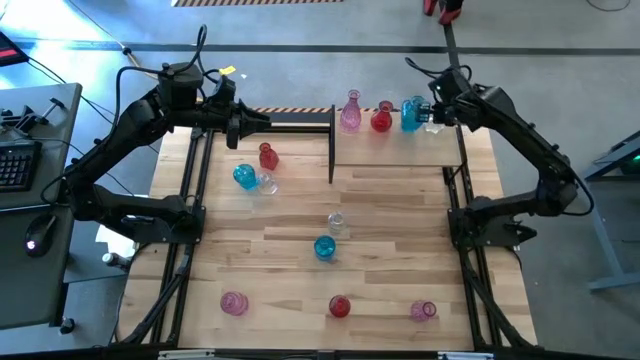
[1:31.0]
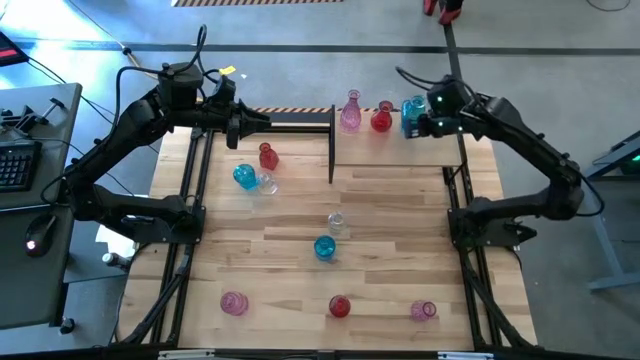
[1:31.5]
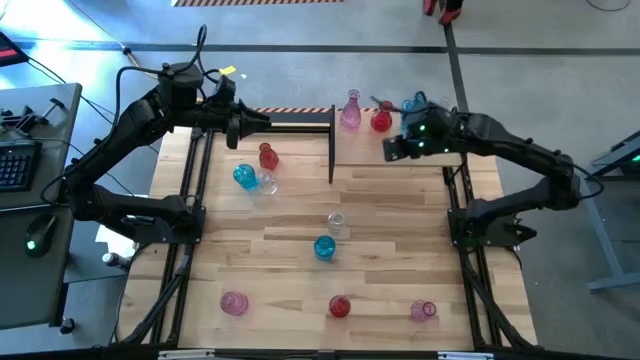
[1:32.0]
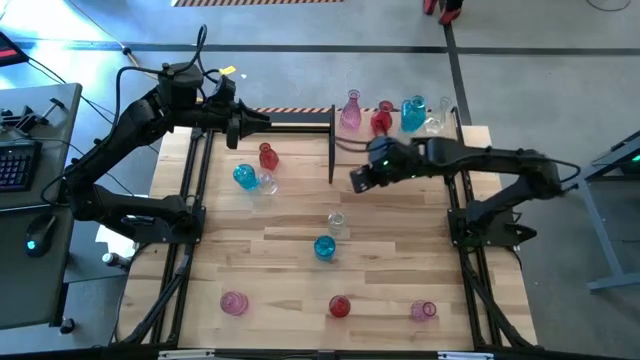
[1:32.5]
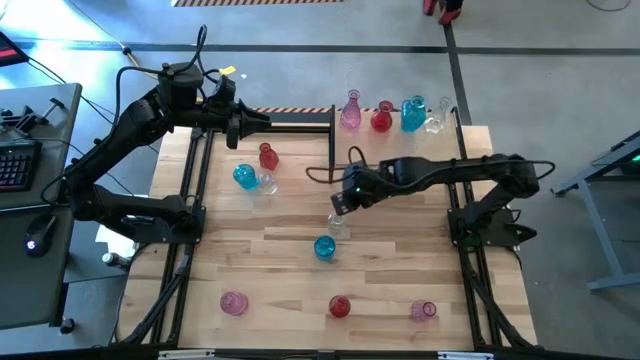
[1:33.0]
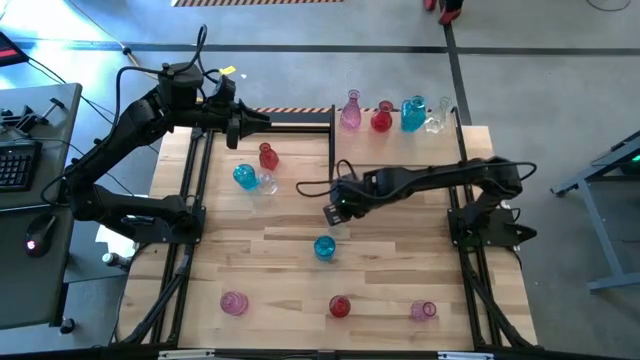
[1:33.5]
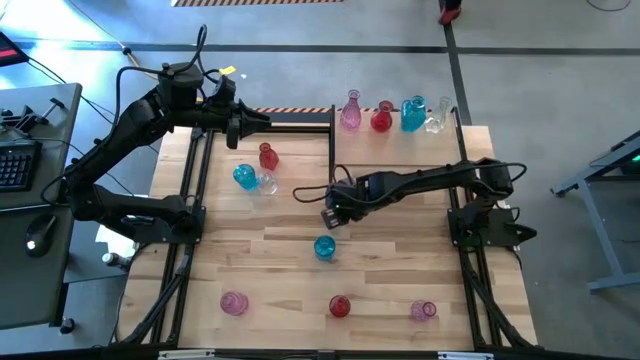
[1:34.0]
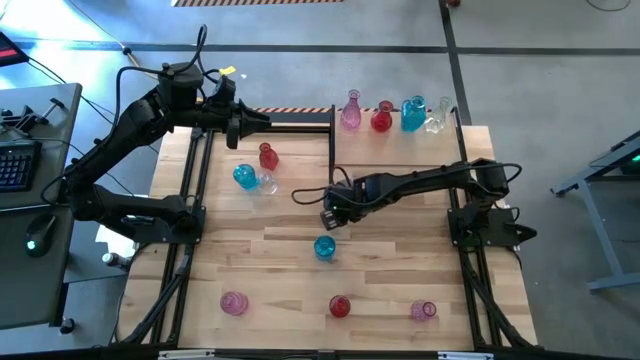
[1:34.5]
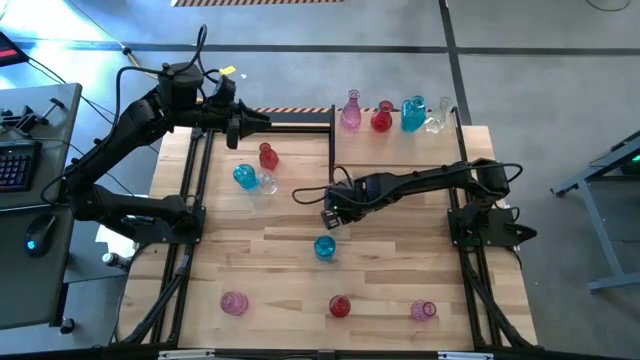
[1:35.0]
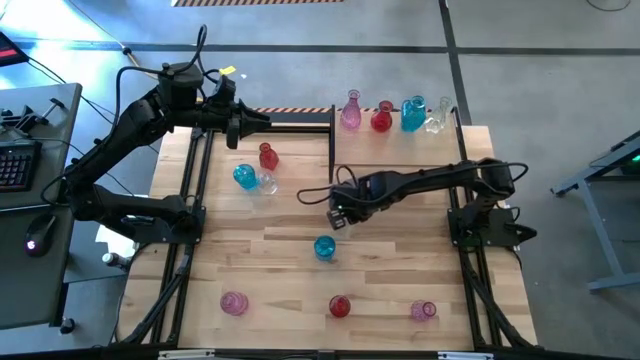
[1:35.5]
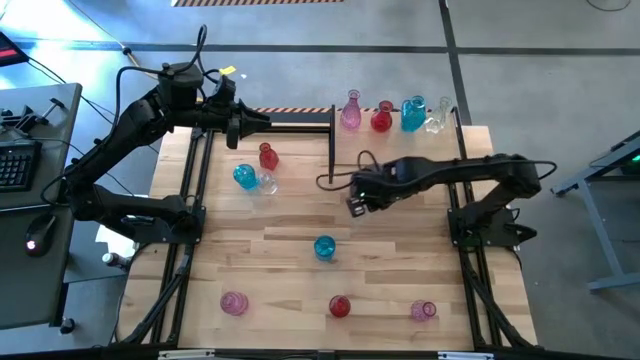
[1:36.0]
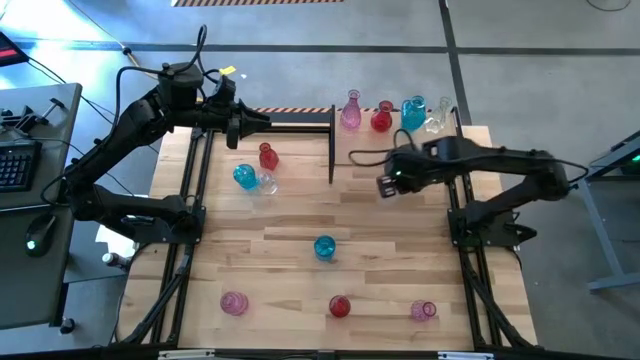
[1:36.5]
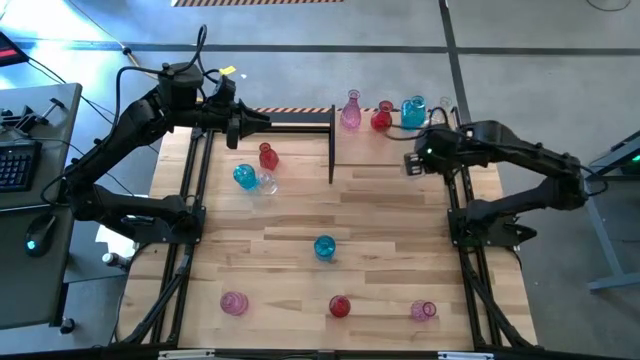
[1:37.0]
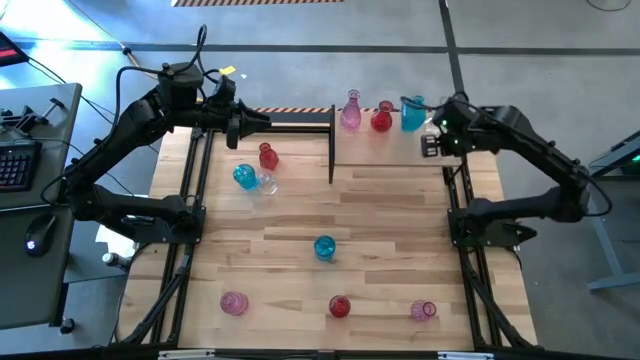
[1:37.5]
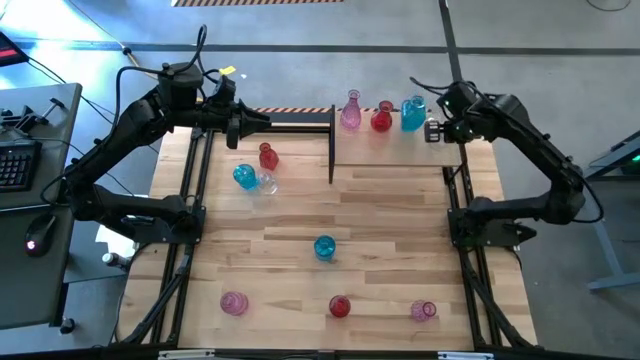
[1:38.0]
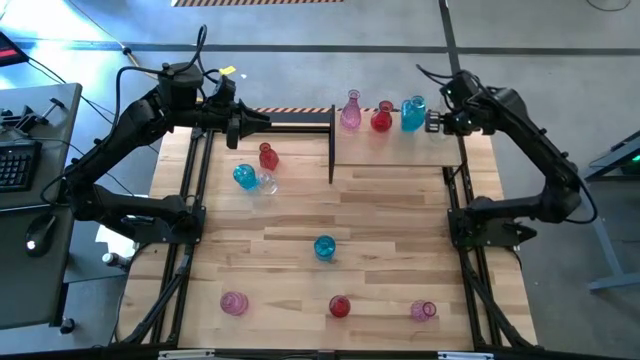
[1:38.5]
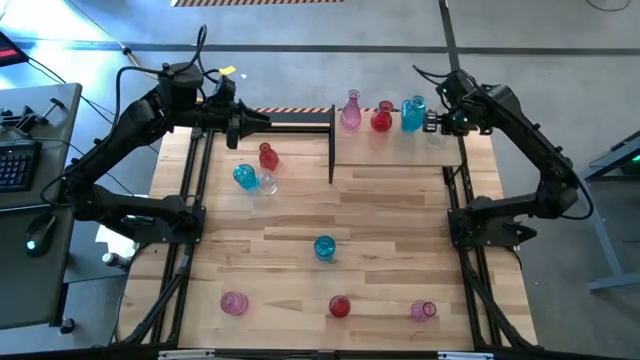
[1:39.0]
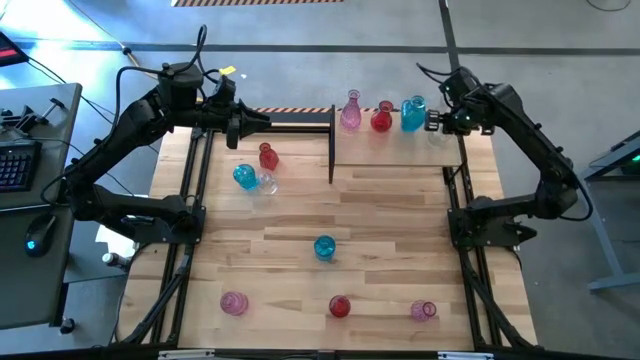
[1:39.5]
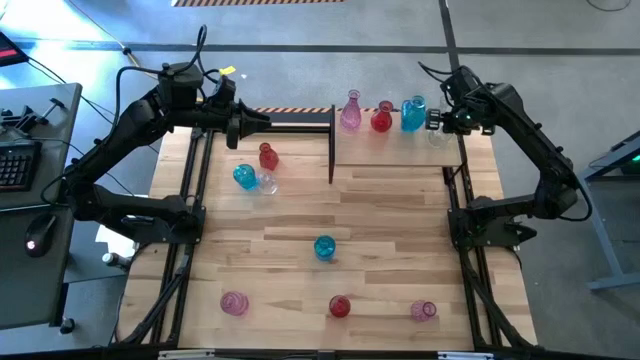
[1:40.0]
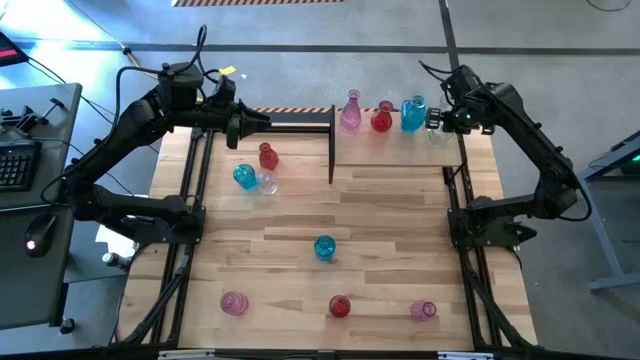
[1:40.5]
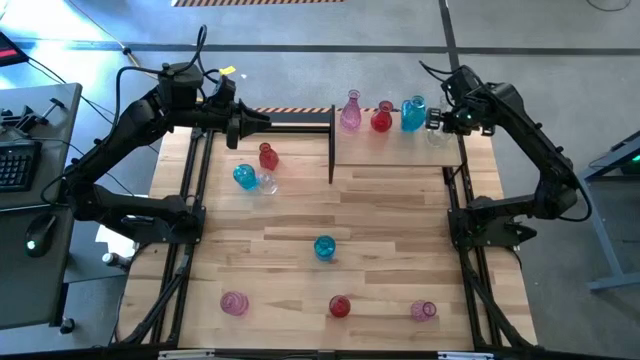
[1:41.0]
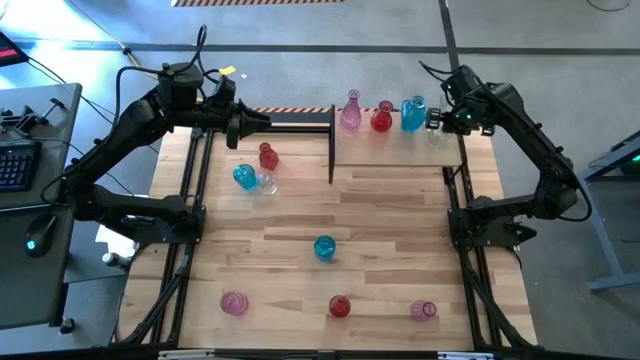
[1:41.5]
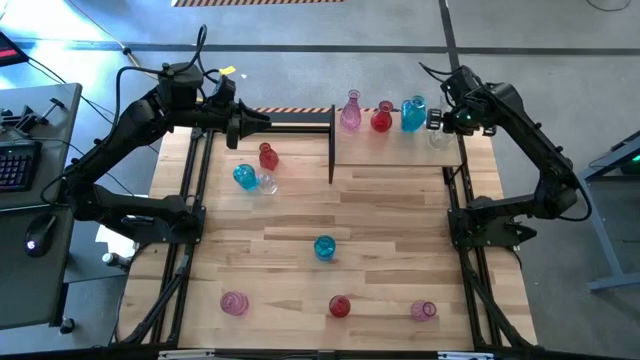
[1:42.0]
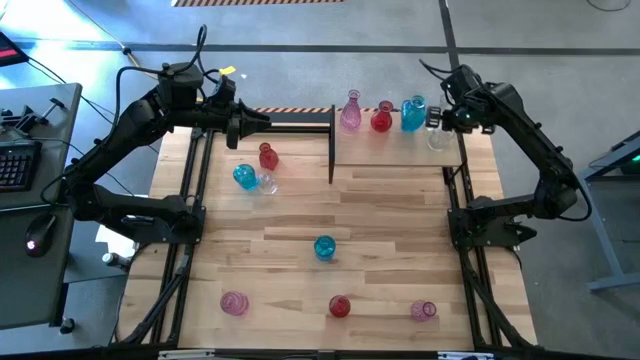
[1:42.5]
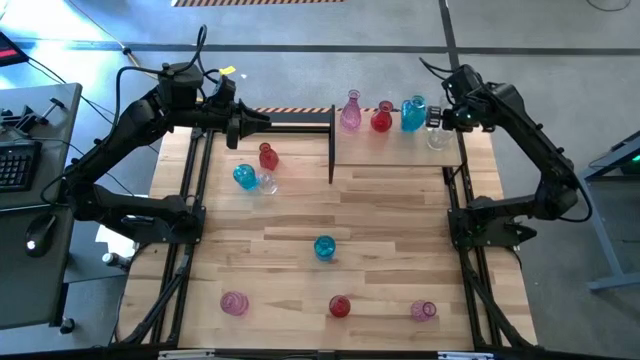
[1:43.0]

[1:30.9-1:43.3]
Task: sort vases onto shelf
Put the bottom transparent vase on the shelf aligned with the transparent vase

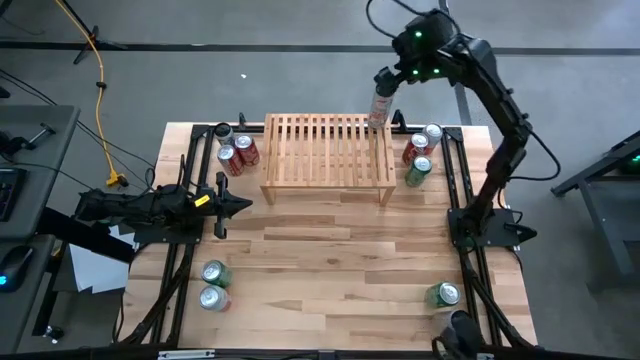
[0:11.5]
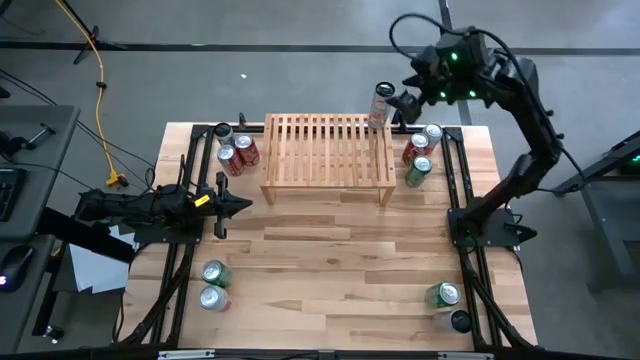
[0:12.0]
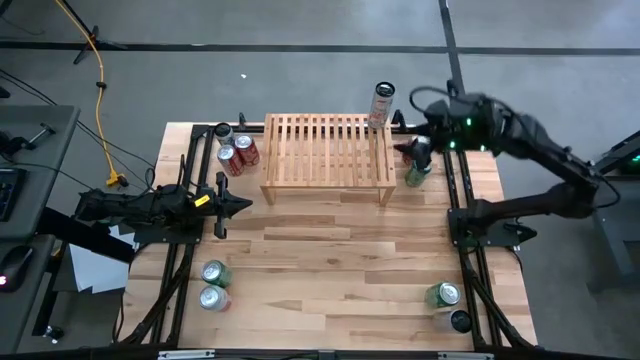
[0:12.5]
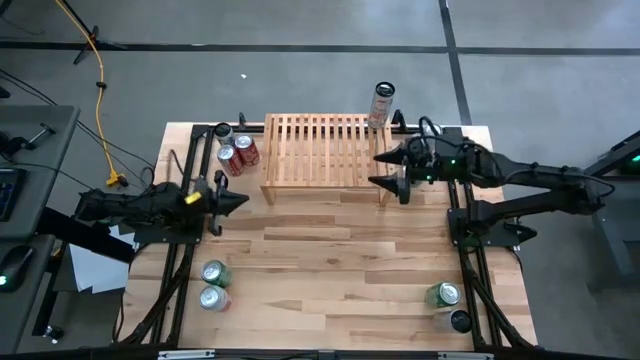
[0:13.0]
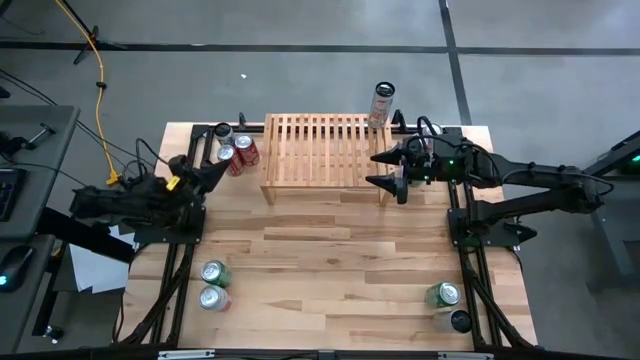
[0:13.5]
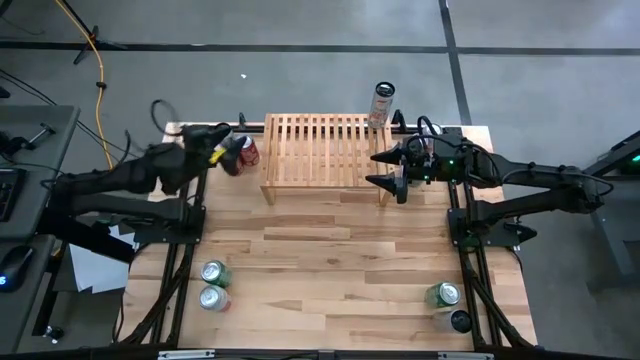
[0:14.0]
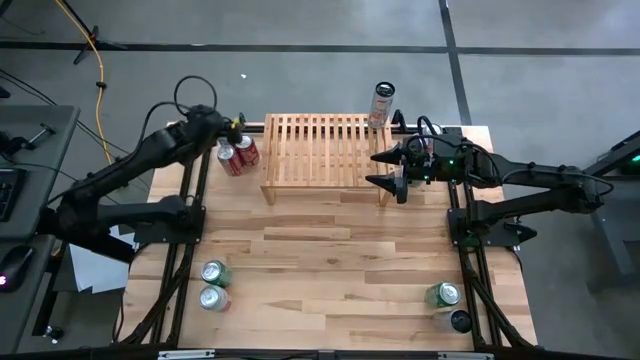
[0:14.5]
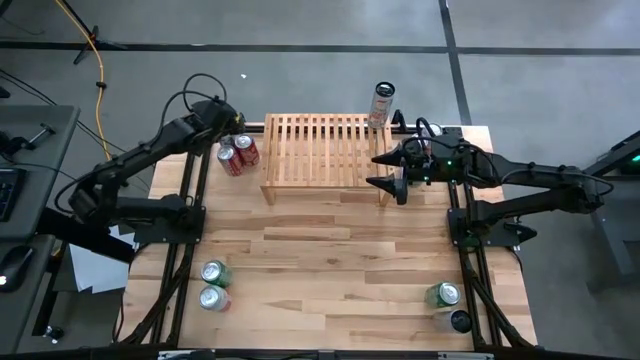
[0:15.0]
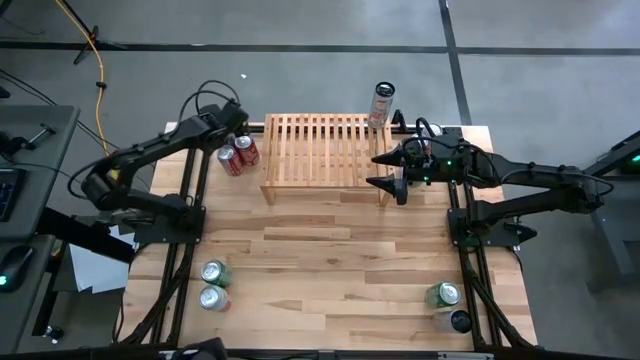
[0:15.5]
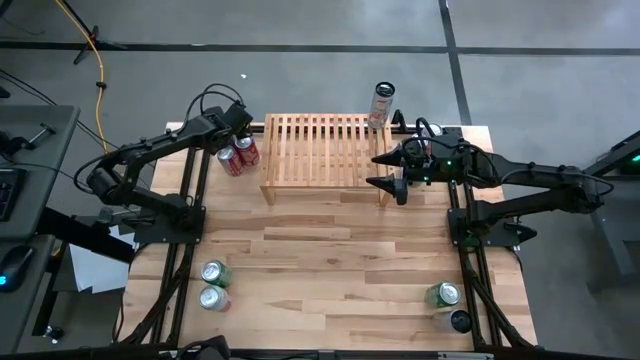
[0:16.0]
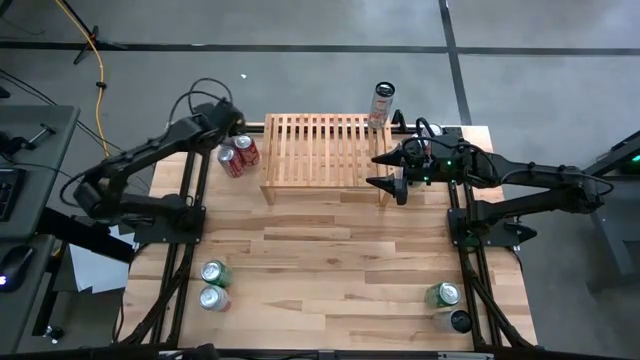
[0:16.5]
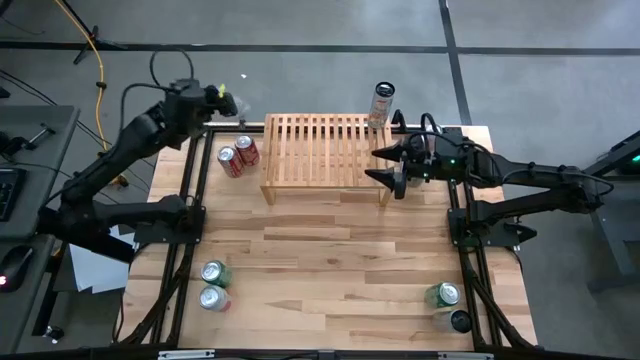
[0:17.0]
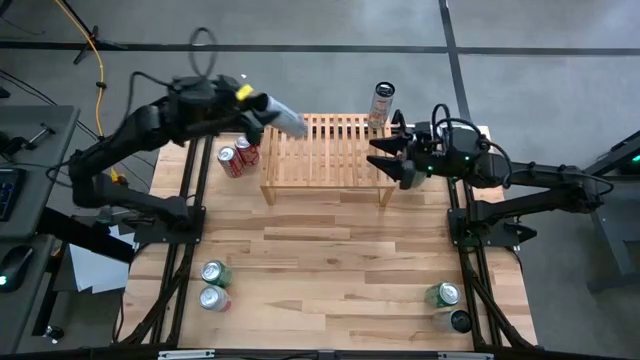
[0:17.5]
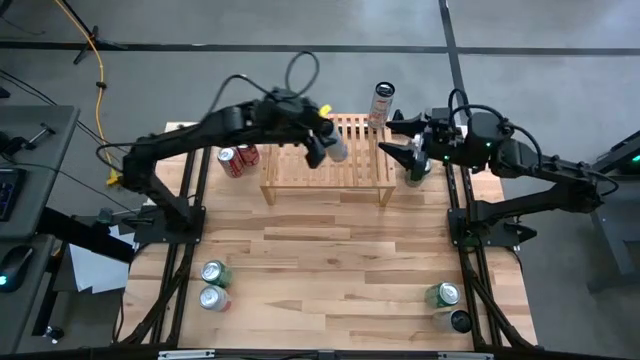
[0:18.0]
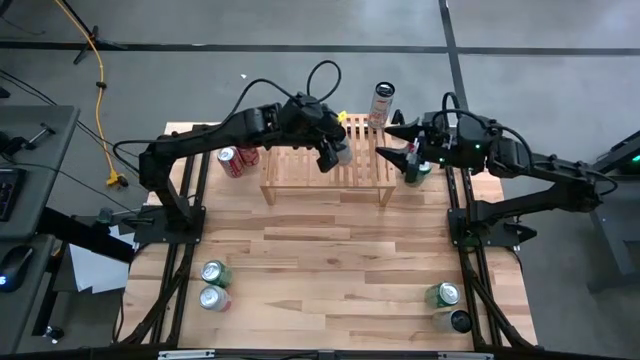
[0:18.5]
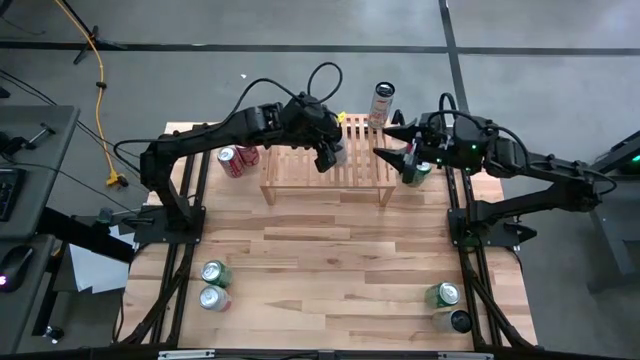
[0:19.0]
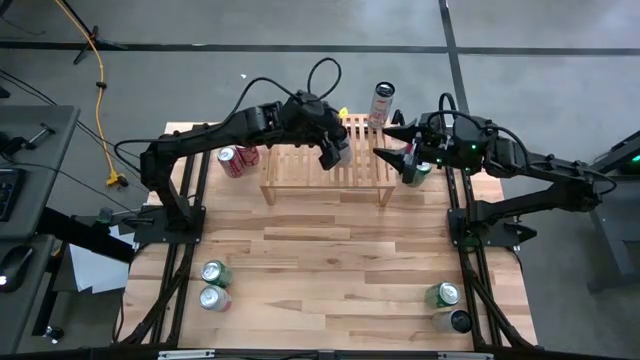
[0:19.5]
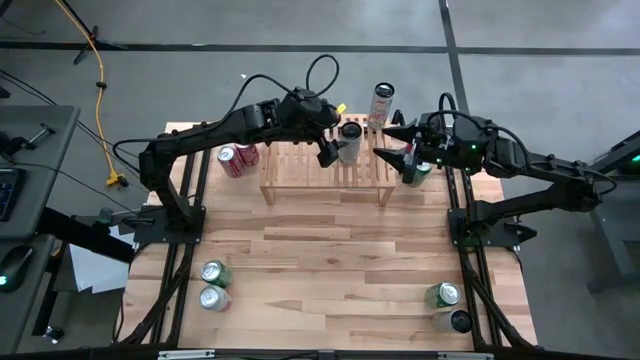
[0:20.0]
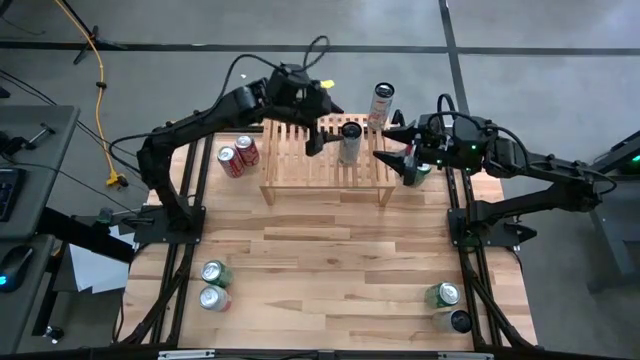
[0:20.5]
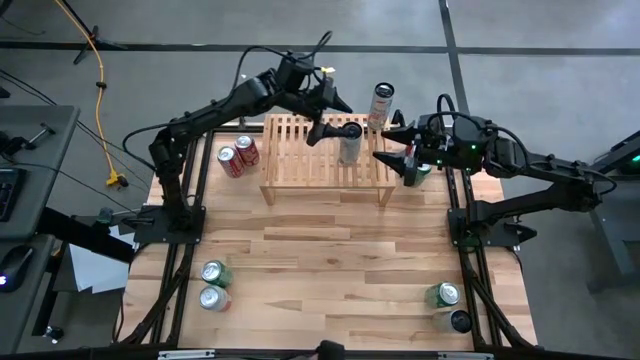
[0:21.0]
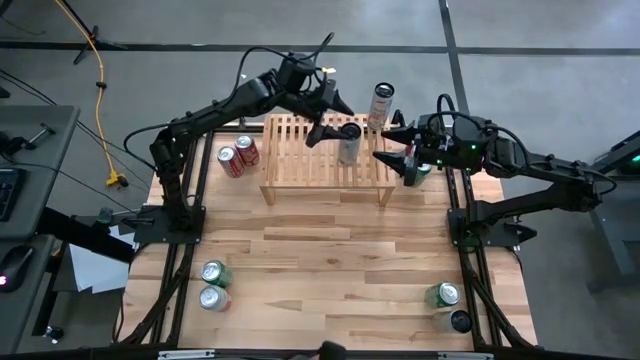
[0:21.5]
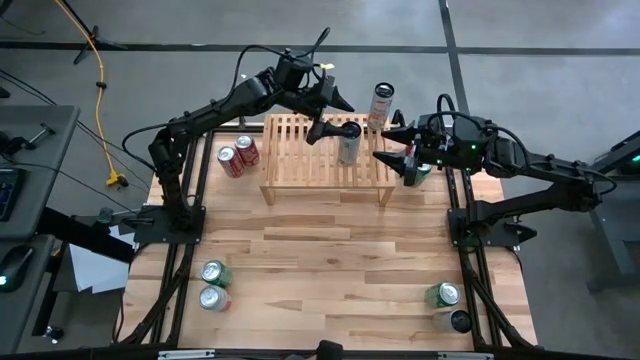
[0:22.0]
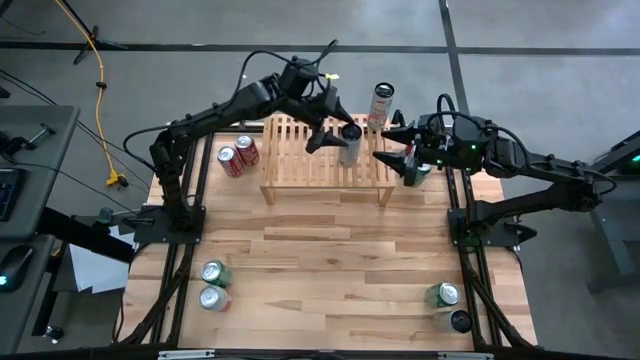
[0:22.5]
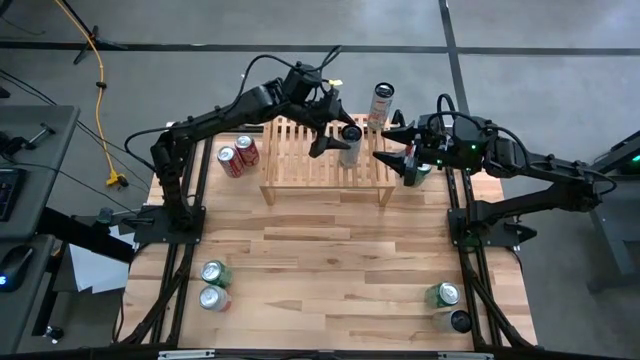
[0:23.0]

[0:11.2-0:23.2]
Task: Place canned beverage on shelf
Put the top white pink soda can on the shelf aligned with the other white pink soda can
